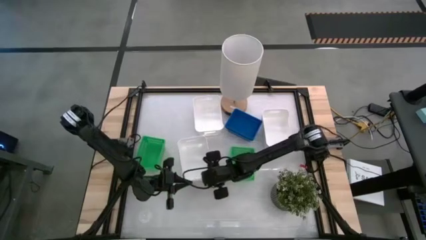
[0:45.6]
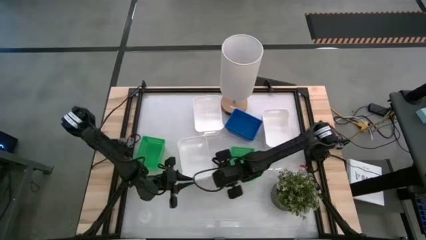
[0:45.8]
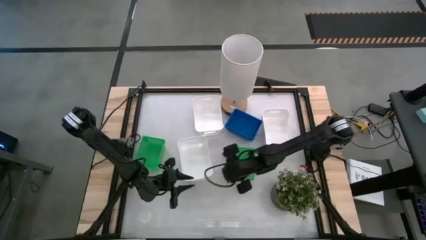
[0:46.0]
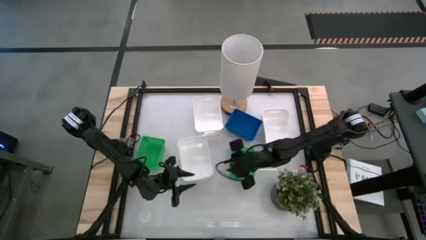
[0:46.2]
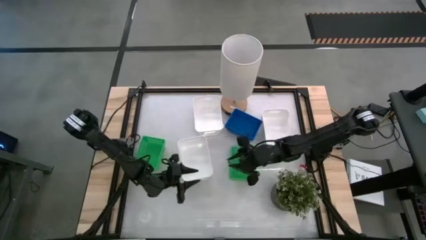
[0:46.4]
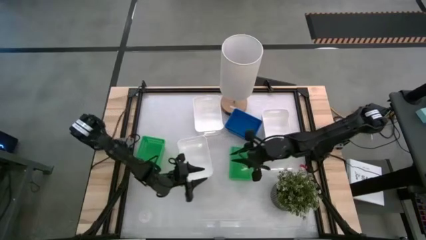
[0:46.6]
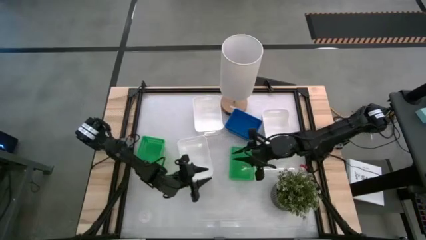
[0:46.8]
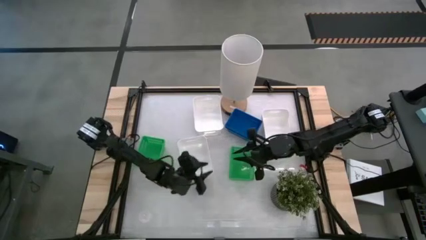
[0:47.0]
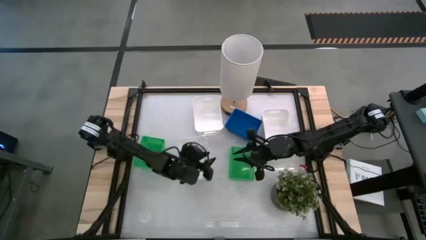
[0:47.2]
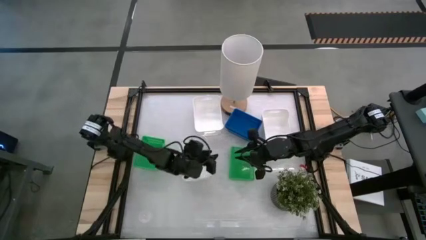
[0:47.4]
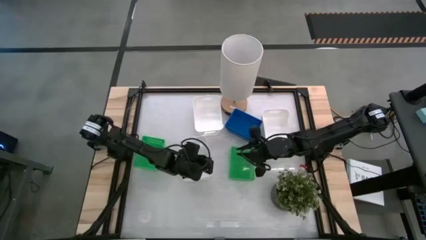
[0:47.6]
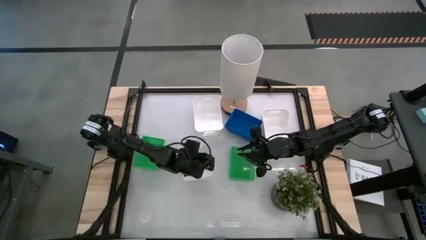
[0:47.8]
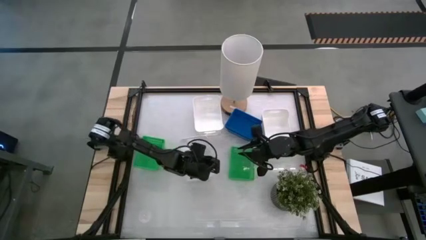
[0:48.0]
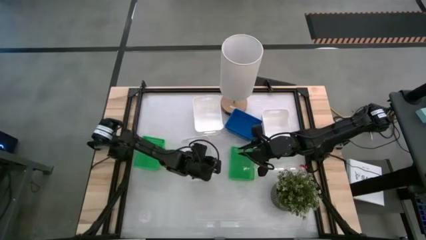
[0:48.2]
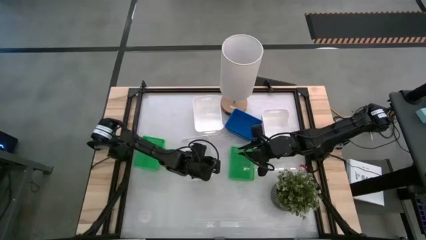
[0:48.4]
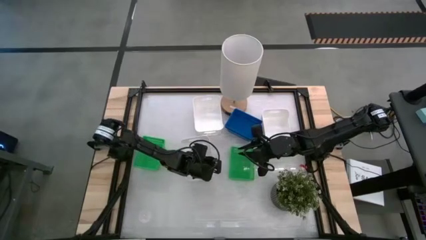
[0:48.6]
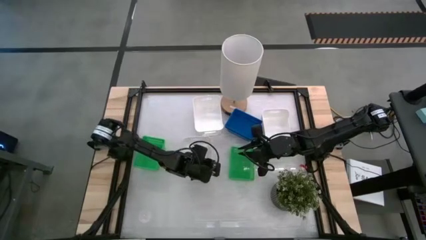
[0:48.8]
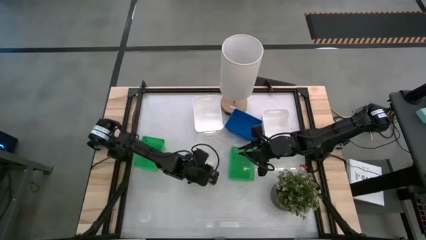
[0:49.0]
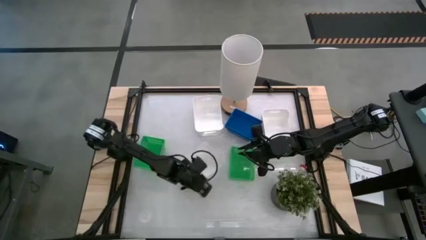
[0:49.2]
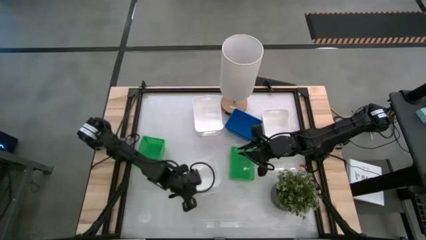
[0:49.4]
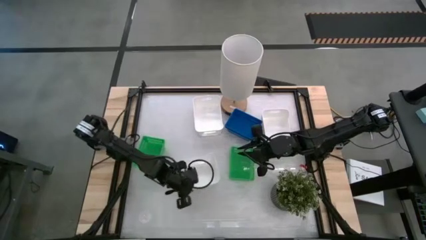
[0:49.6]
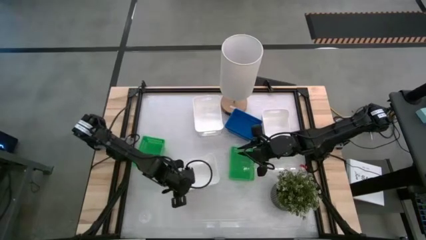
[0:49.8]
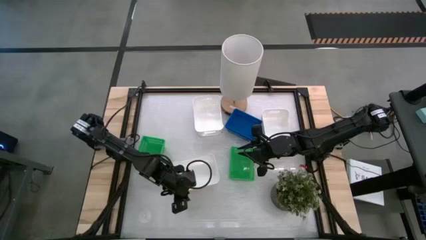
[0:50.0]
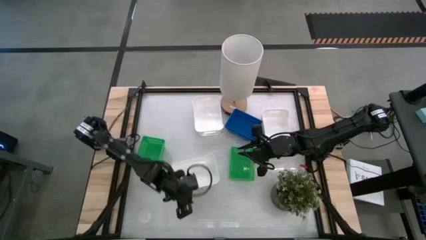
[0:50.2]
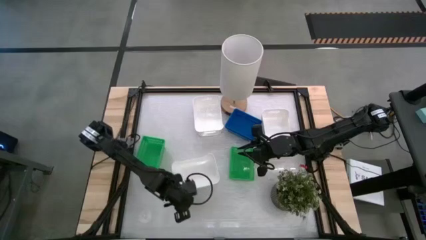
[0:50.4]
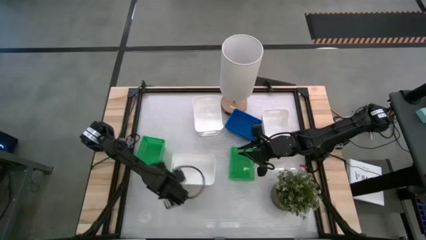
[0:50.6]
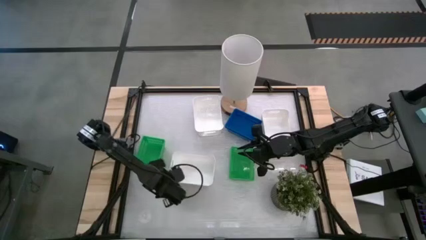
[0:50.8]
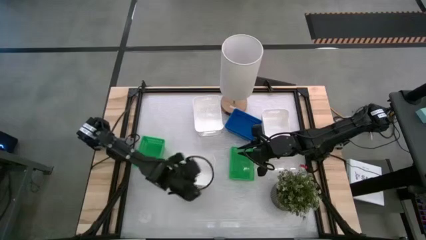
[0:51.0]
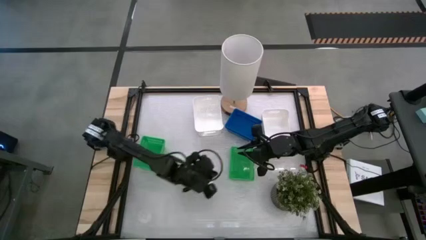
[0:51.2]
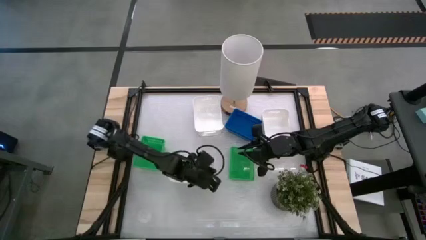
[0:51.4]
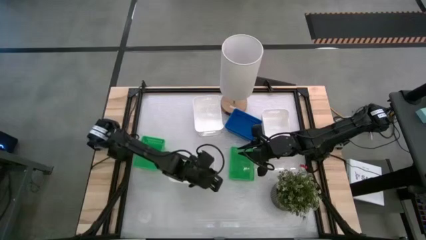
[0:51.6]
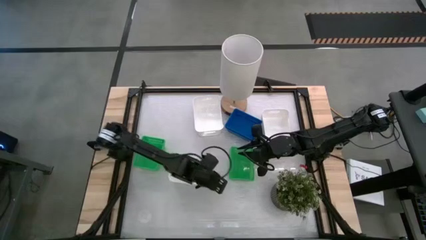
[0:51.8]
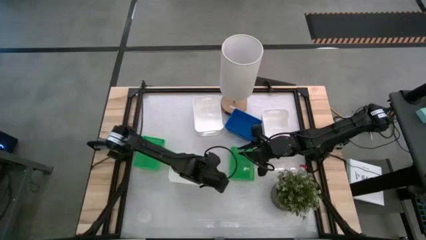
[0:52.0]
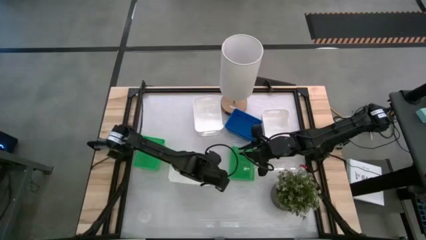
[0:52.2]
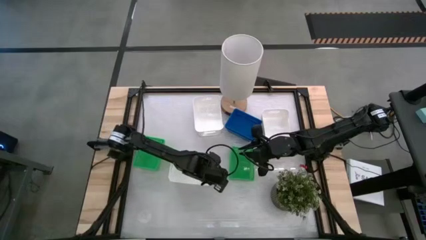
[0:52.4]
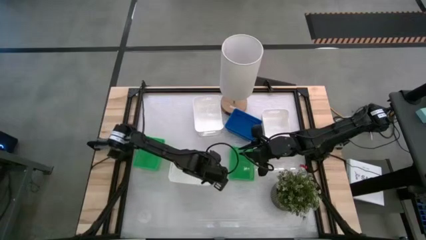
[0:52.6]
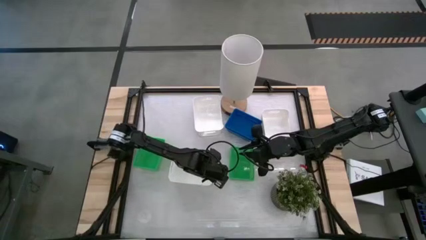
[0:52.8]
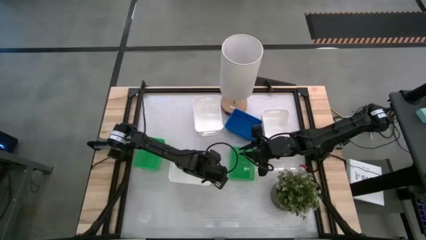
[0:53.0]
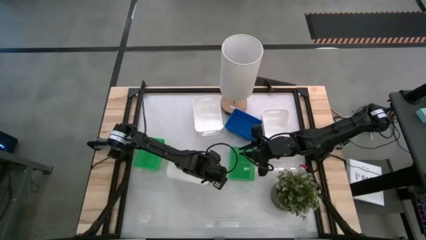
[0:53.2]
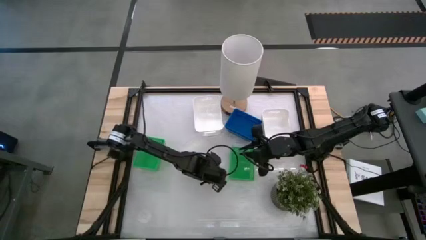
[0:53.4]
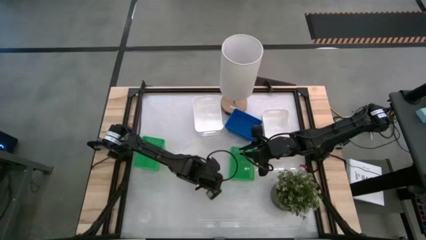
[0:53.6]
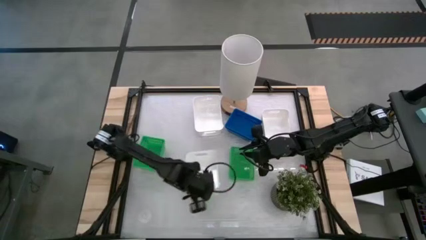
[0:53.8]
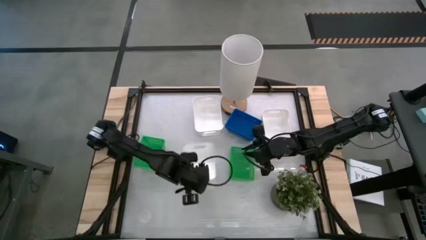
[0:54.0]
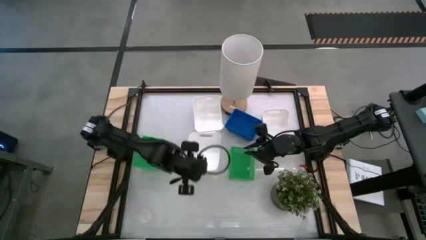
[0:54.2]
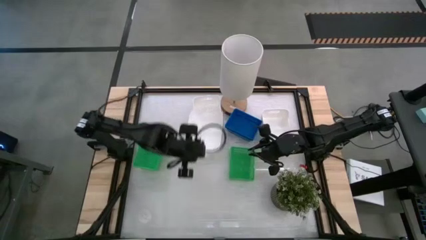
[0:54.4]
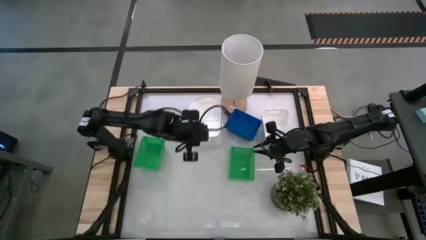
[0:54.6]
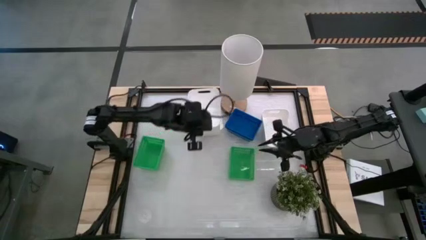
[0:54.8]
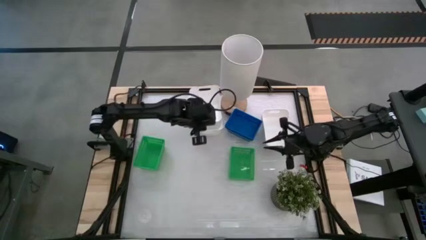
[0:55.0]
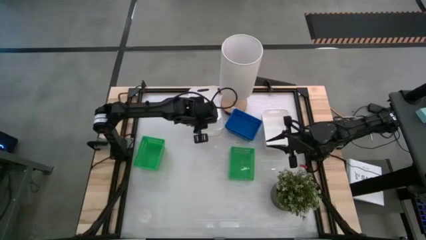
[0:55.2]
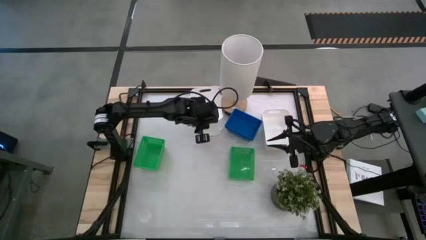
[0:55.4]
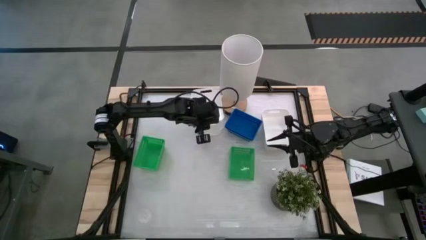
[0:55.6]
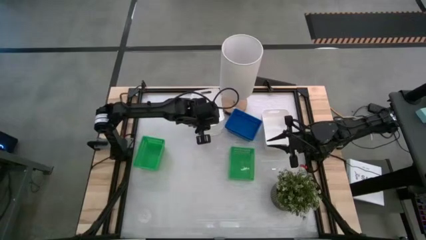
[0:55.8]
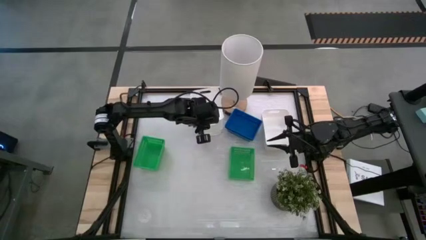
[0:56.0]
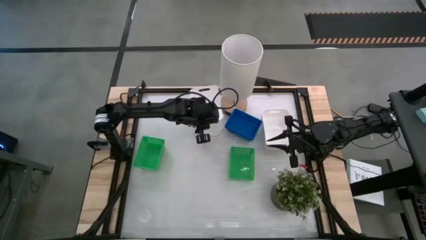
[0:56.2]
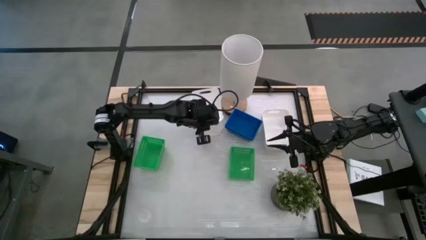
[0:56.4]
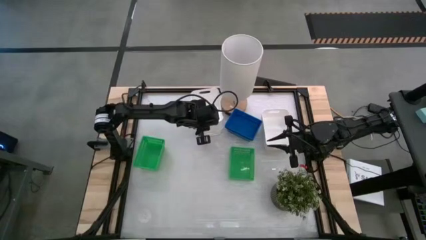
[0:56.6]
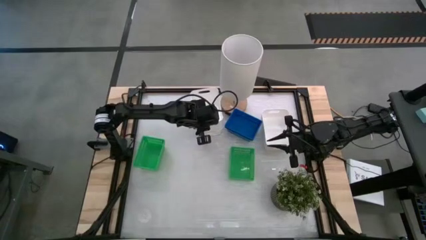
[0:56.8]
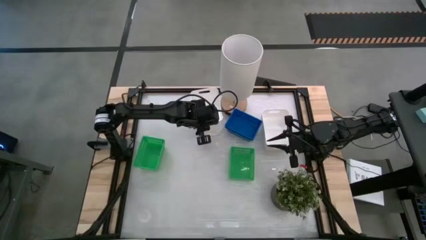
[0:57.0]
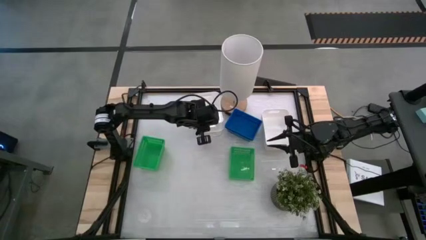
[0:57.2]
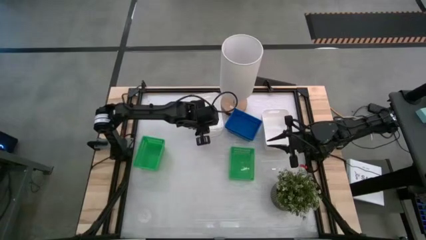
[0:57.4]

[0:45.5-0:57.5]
Stack the bottom white bin on top of the top white bin on the table

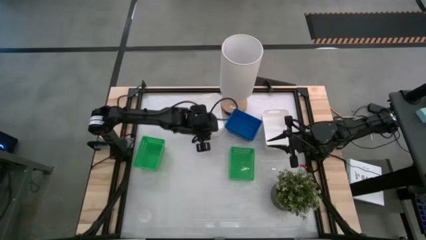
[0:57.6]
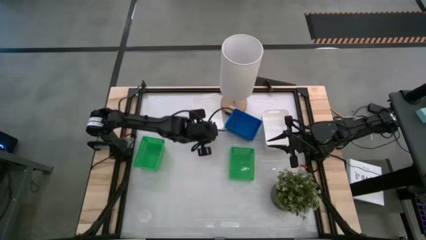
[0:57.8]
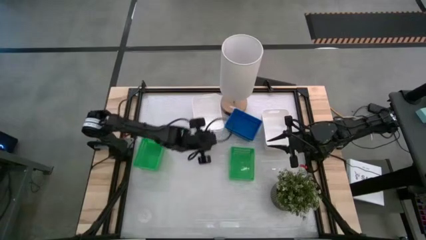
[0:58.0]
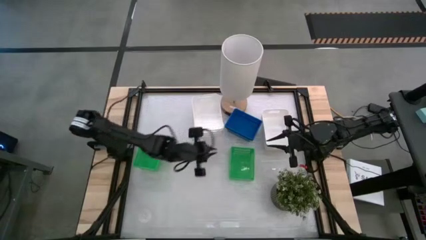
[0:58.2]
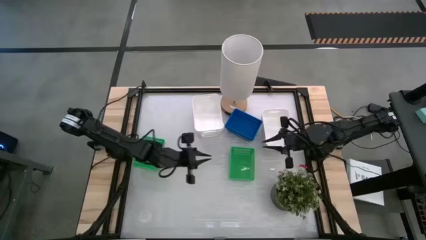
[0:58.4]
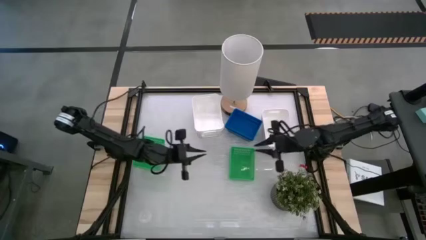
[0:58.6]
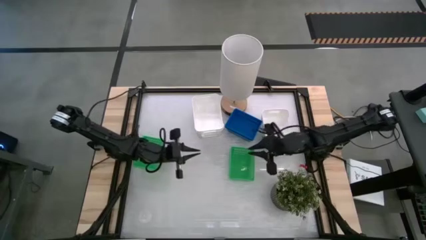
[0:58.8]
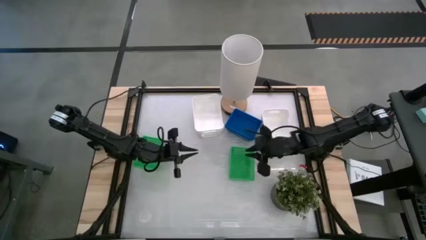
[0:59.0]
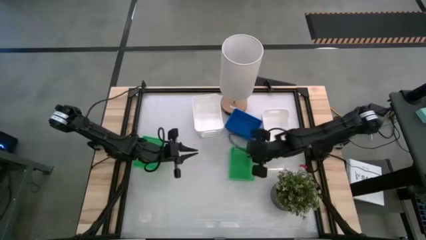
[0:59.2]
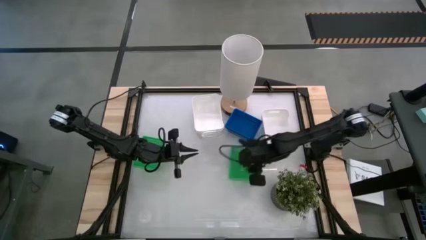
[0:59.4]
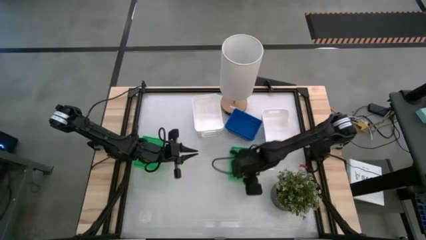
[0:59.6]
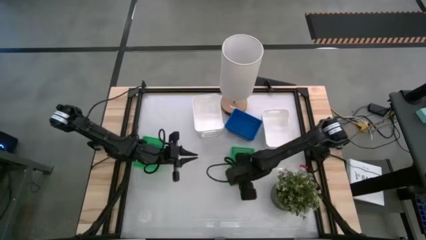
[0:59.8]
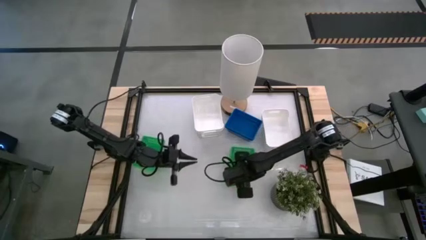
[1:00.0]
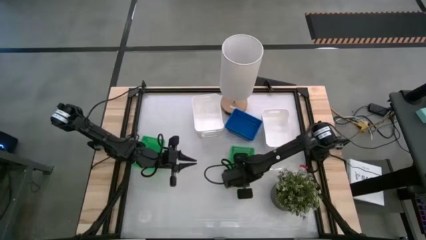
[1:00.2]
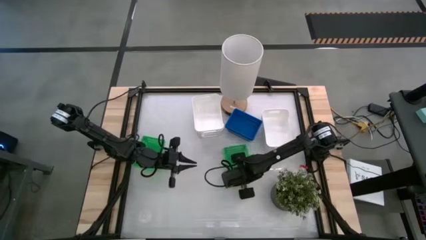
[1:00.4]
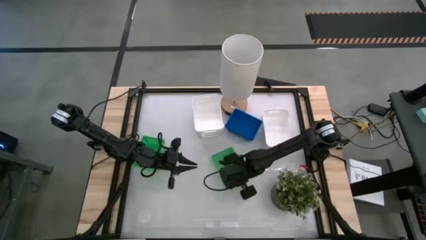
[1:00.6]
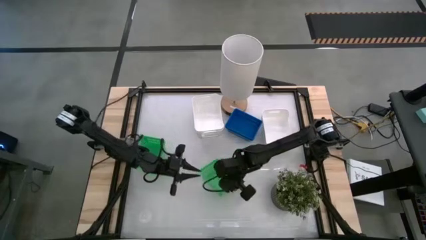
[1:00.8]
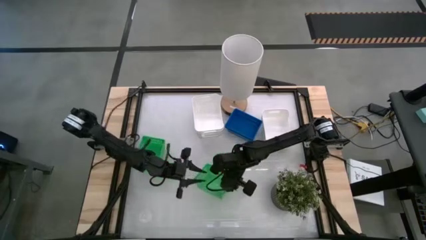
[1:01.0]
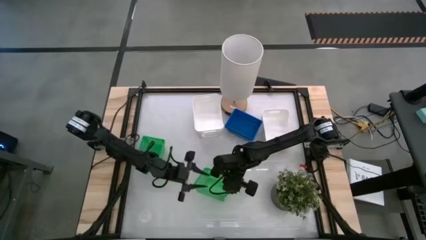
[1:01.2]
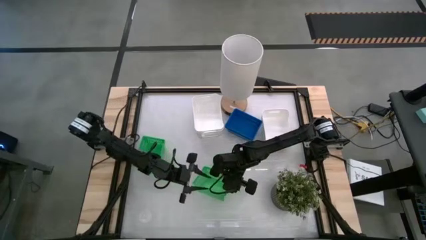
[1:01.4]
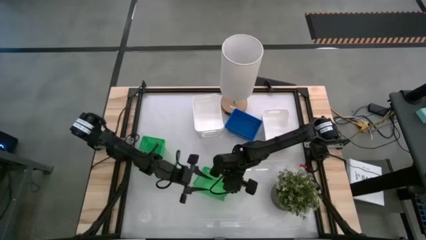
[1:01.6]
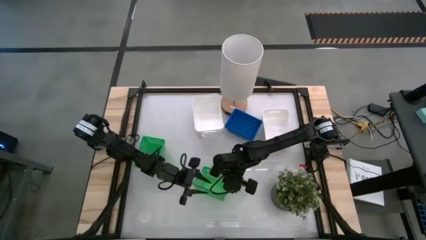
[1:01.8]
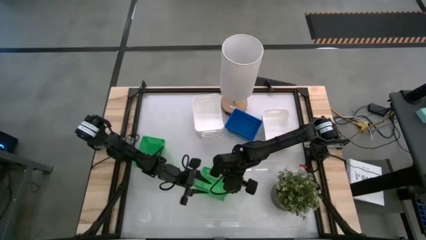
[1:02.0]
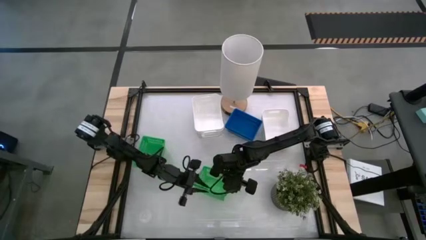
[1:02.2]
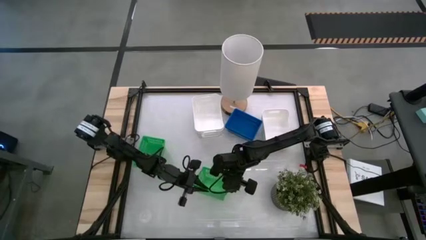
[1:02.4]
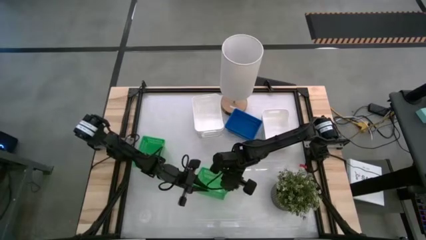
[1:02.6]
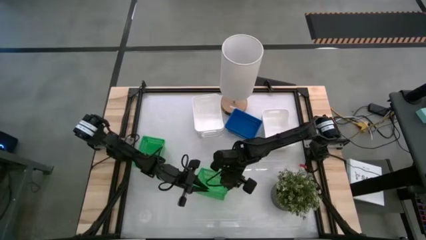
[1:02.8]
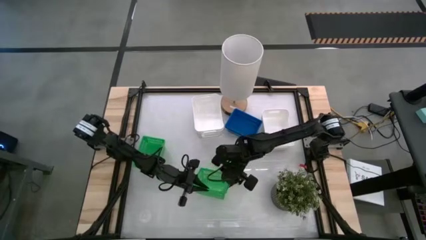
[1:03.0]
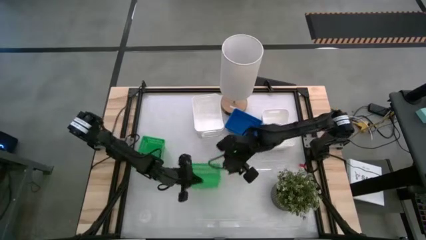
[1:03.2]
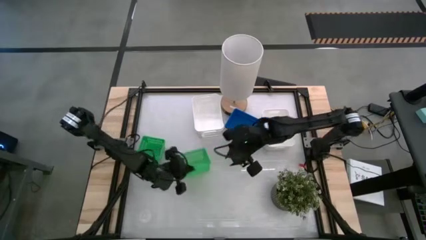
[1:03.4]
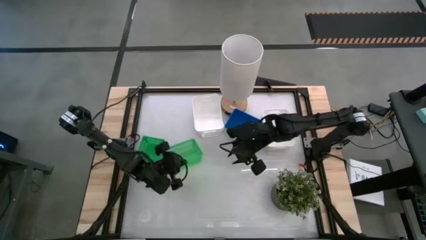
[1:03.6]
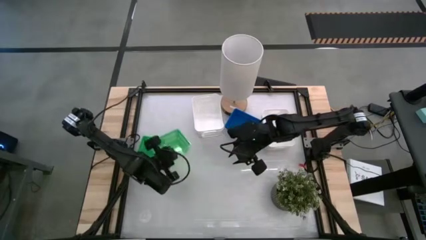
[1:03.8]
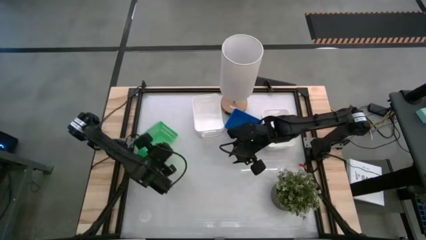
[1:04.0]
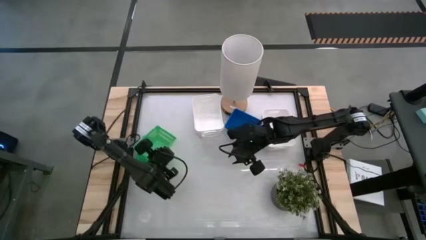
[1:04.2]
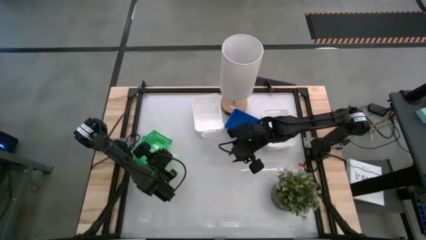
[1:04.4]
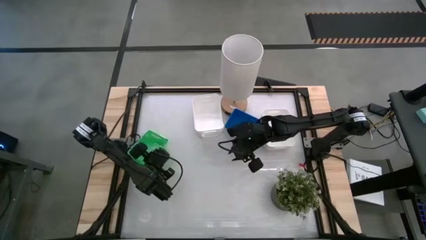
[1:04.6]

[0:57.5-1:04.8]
Stack the right green bin on top of the left green bin on the table
